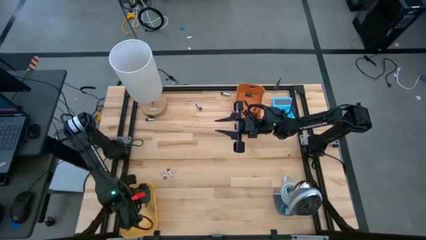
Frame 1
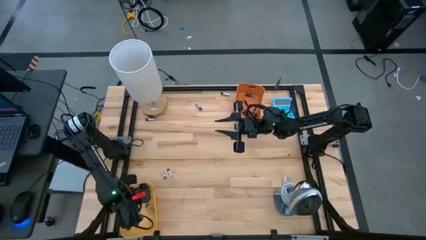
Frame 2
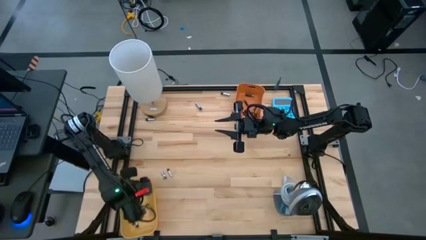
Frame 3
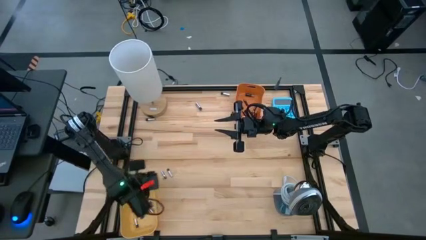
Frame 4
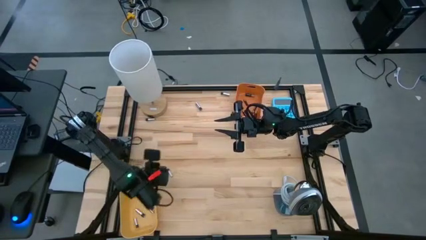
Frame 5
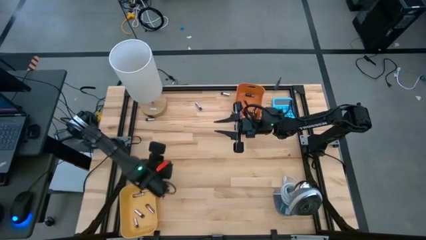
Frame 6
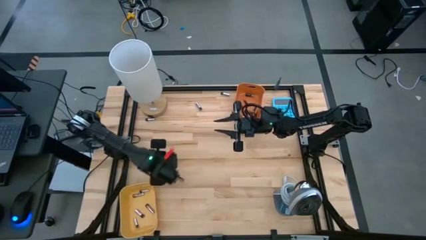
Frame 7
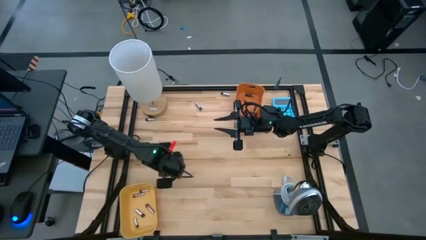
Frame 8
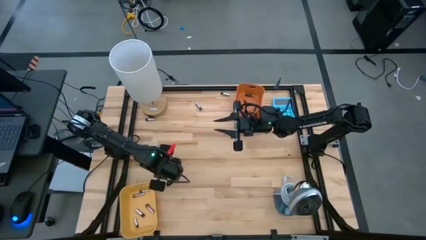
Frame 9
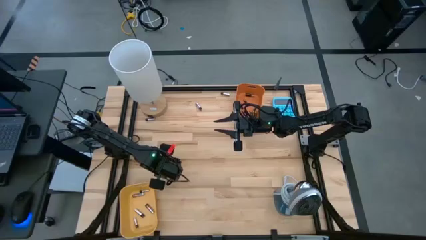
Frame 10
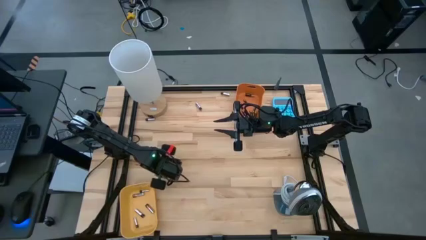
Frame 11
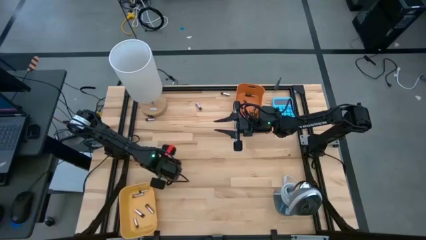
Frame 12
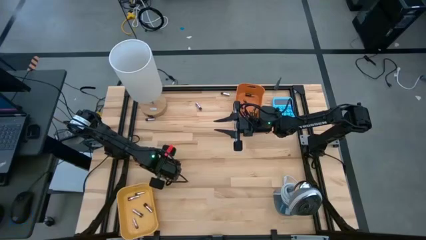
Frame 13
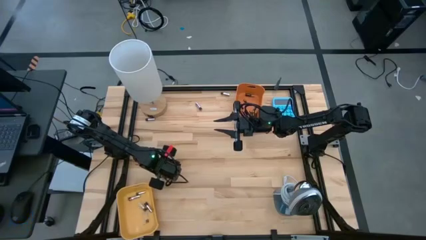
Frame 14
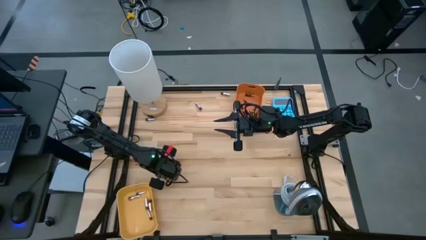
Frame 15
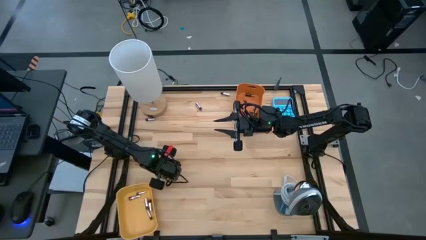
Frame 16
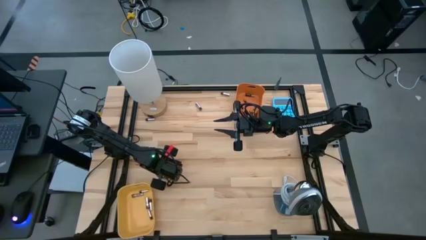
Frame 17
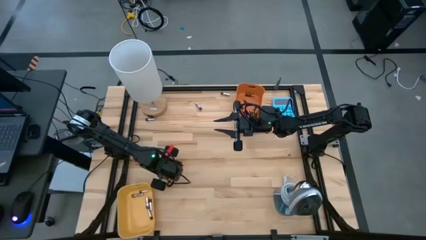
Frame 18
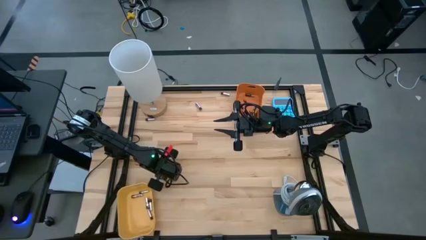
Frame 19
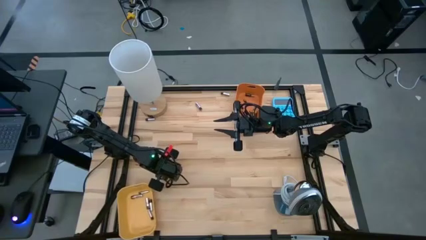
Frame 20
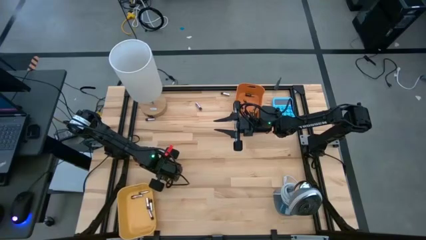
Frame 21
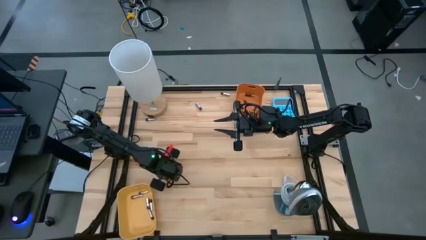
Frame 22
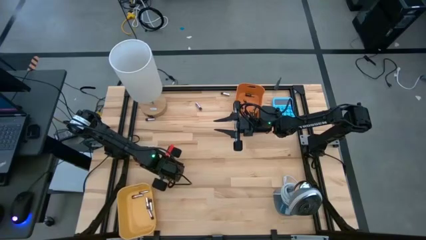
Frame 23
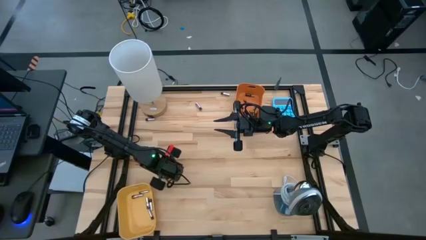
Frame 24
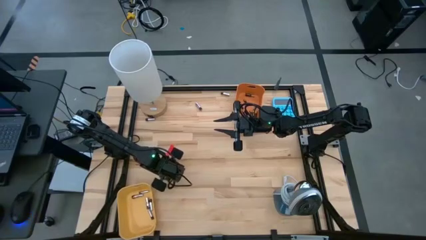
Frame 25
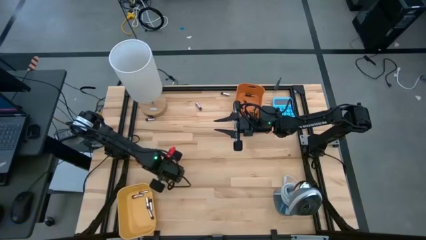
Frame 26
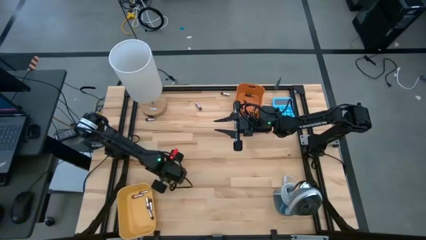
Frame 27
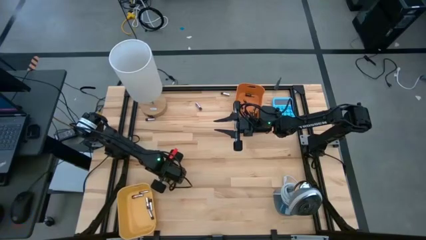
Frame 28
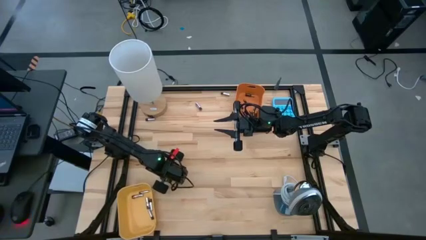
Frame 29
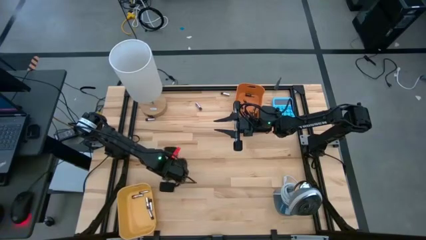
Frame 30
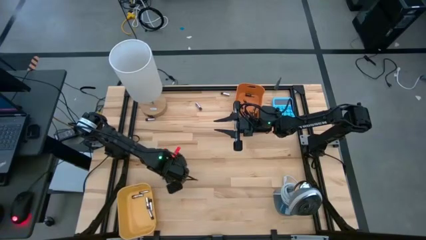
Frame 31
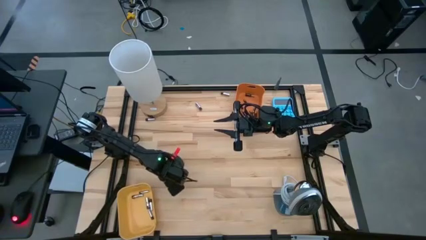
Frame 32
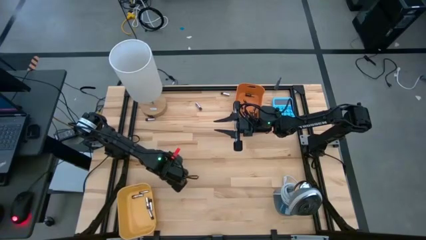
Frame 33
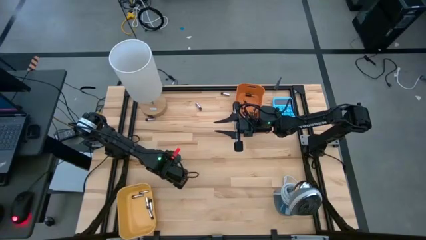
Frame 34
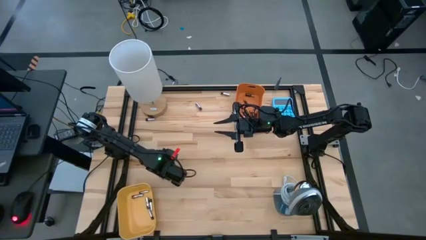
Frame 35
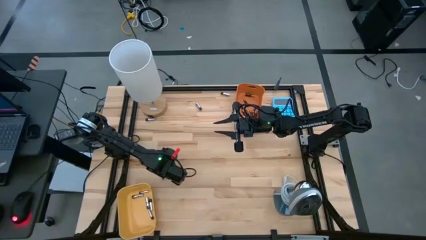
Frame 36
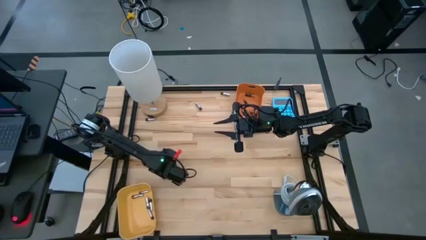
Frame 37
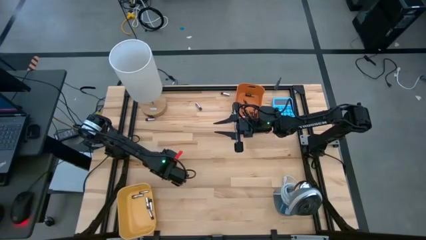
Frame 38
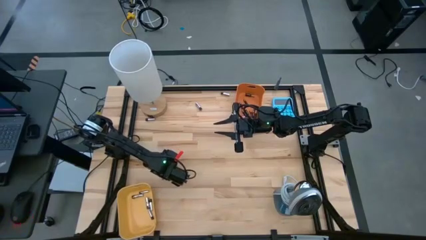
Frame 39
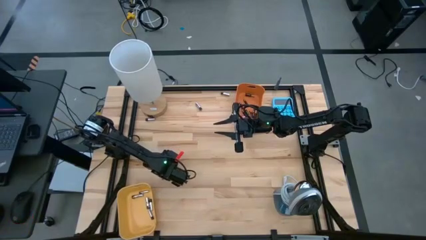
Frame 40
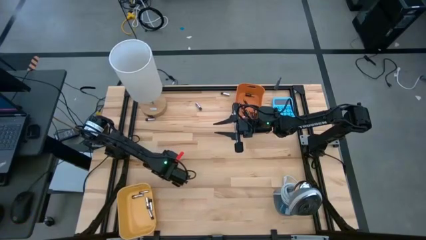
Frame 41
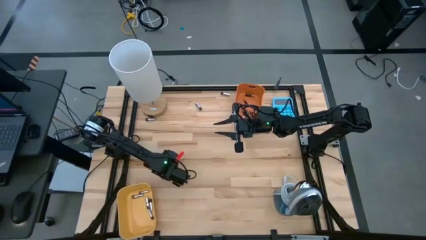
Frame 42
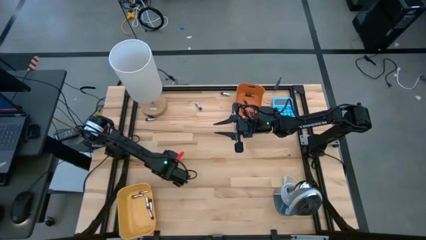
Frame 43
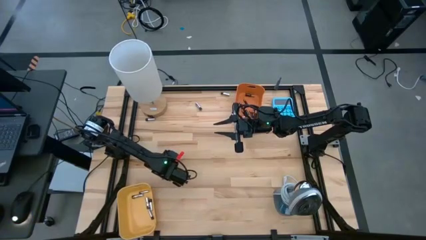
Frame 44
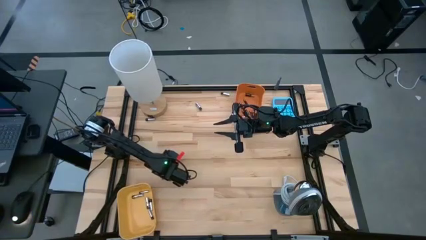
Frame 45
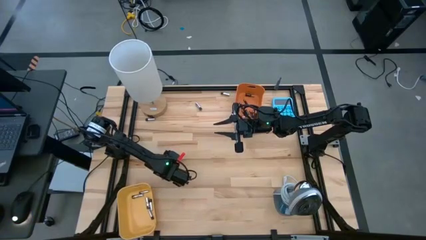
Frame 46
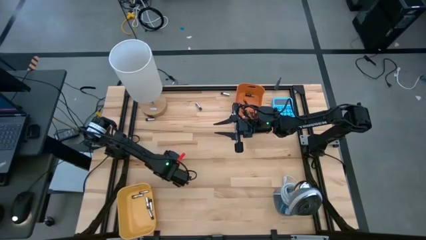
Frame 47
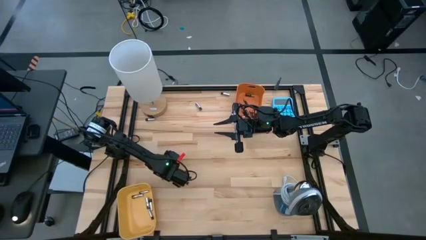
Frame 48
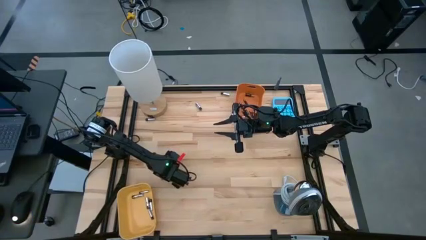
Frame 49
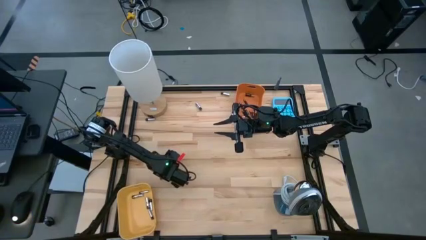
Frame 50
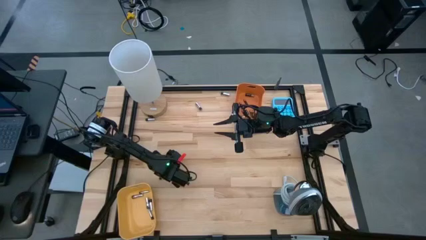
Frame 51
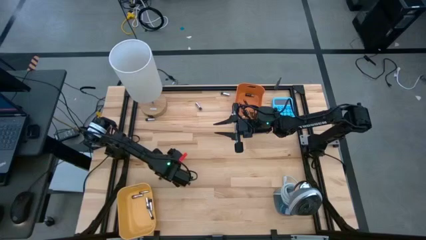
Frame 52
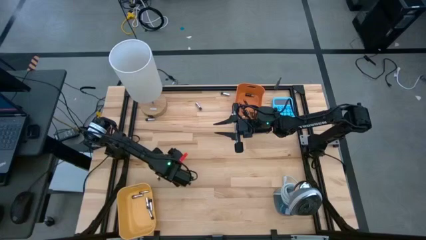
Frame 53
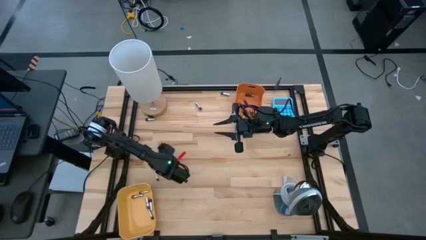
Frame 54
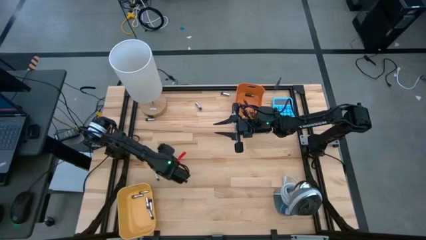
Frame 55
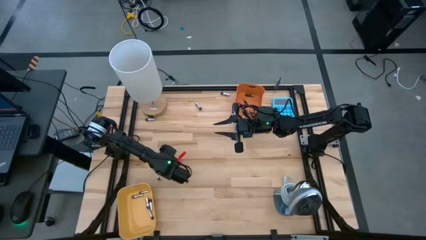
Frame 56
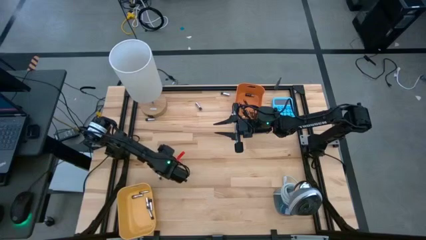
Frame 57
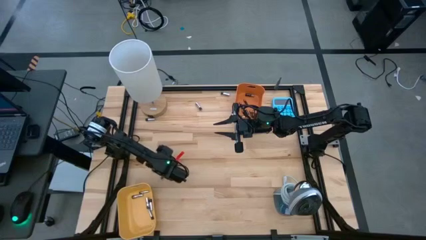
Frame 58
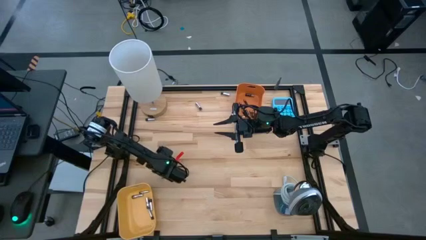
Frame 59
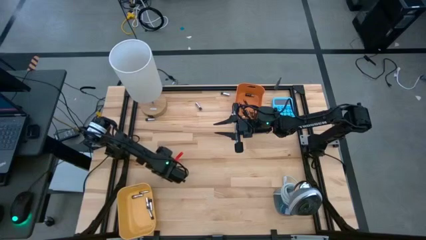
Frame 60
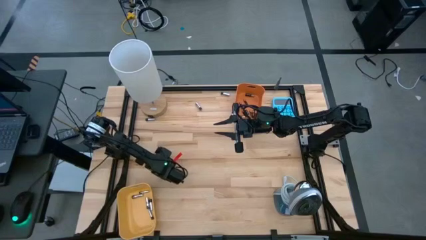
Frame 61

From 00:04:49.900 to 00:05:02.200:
Task: Sort batteries
Put the silver battery into the yellow bin
